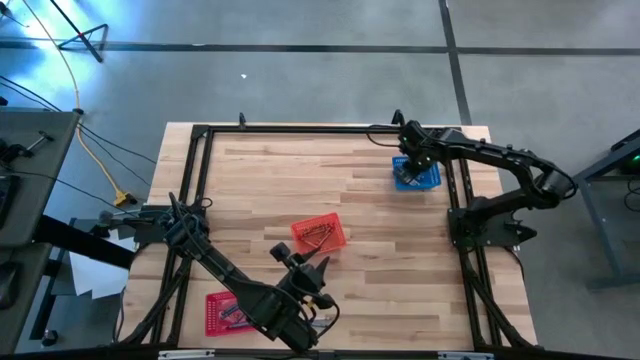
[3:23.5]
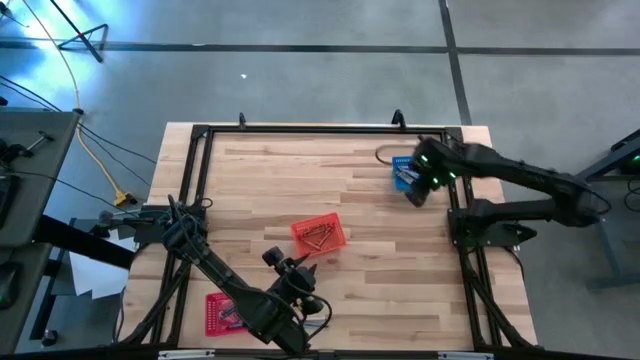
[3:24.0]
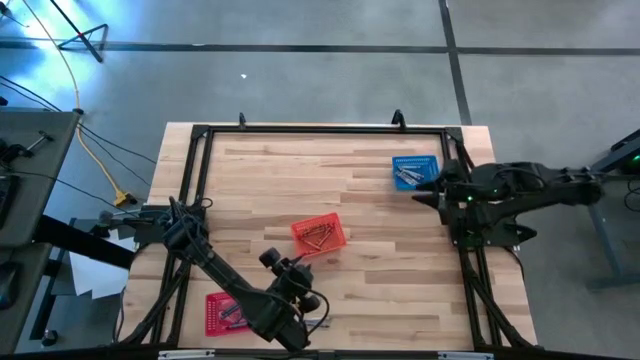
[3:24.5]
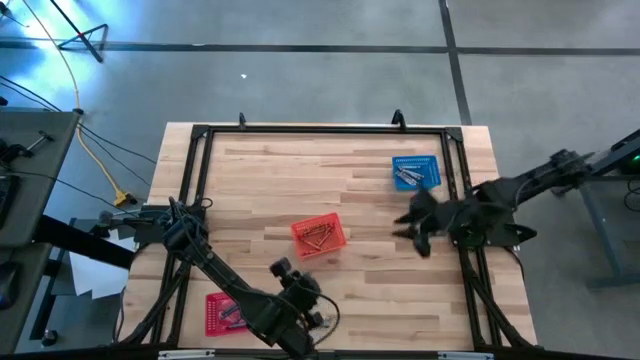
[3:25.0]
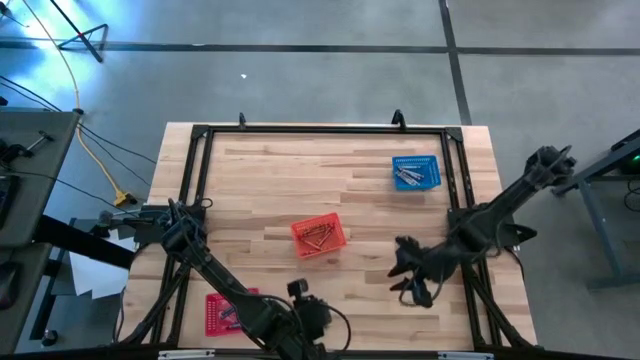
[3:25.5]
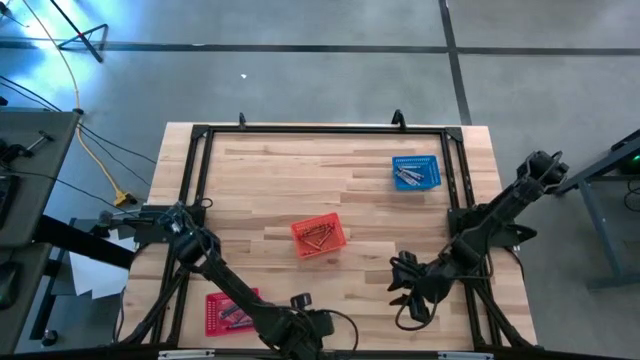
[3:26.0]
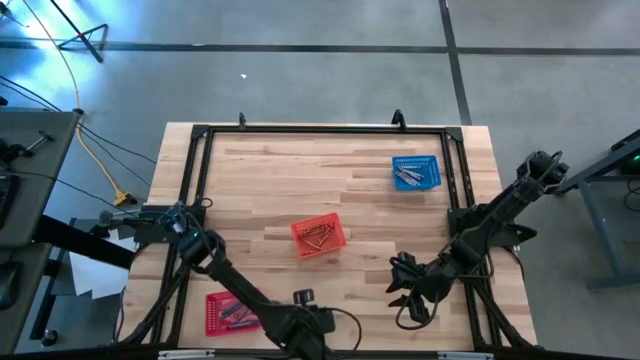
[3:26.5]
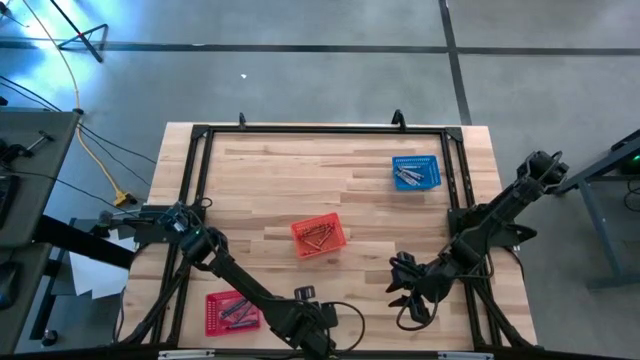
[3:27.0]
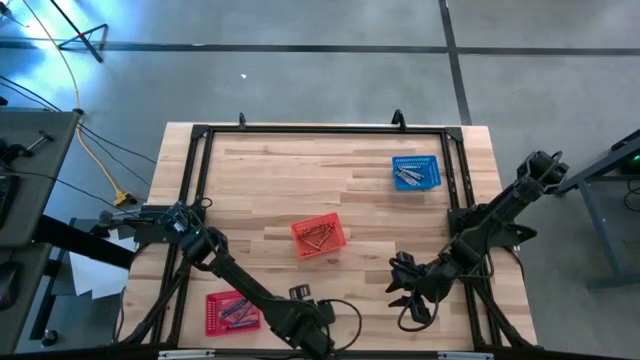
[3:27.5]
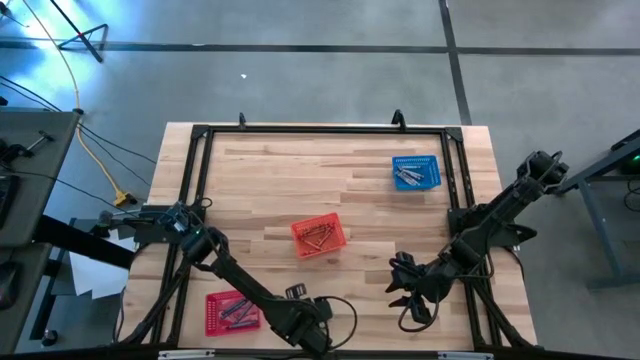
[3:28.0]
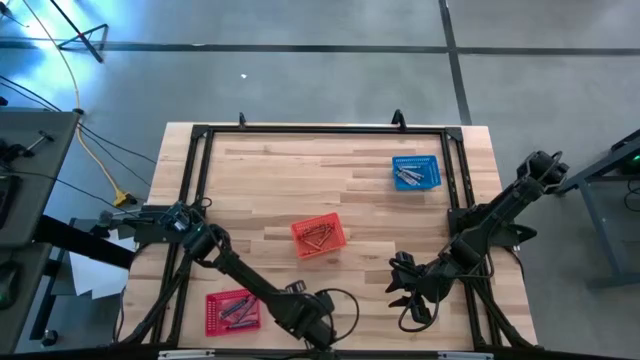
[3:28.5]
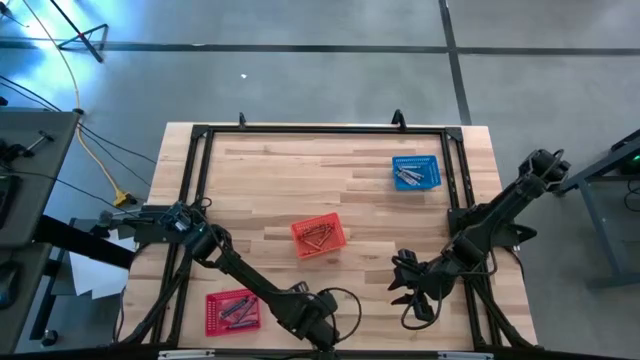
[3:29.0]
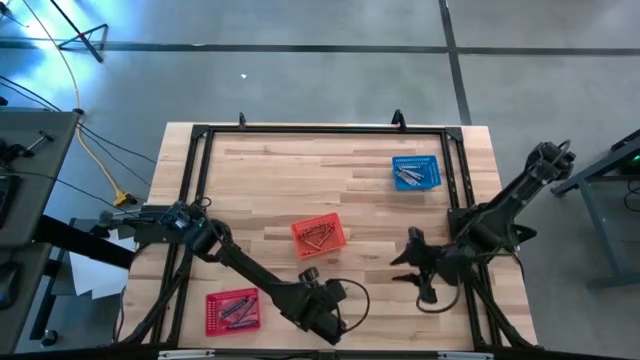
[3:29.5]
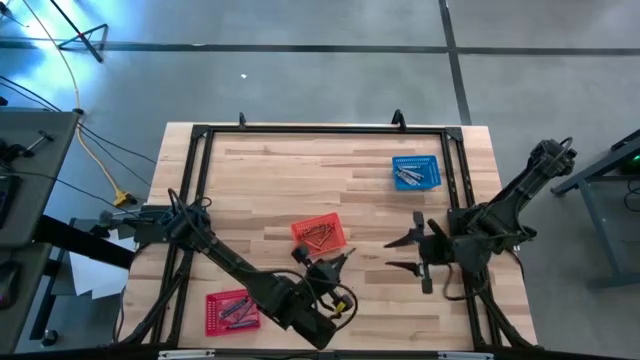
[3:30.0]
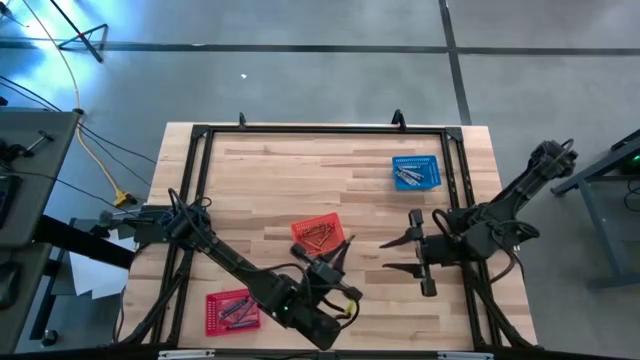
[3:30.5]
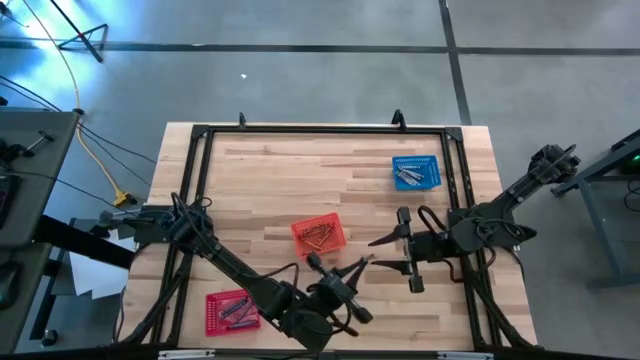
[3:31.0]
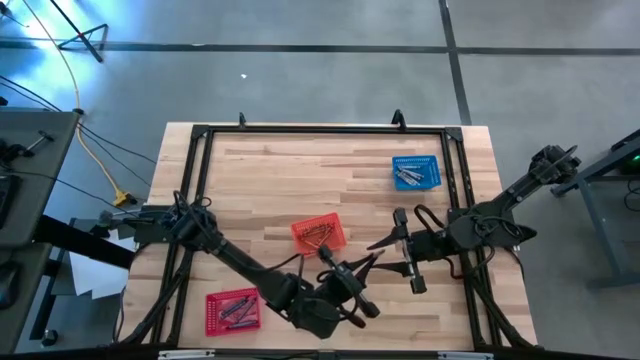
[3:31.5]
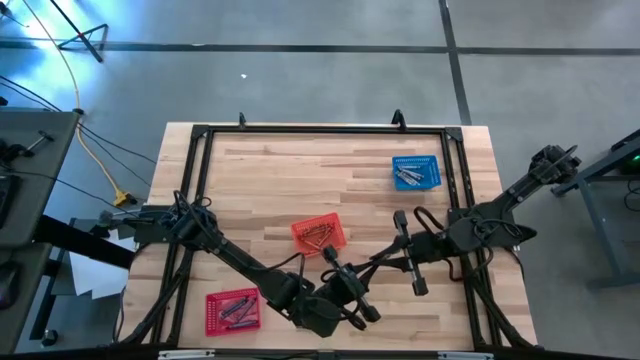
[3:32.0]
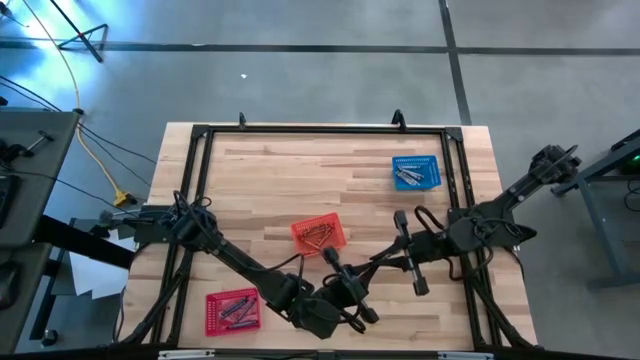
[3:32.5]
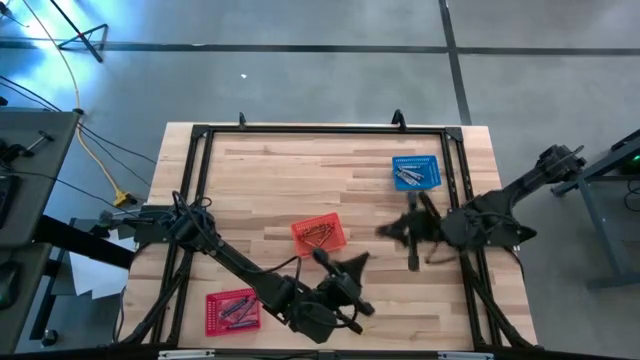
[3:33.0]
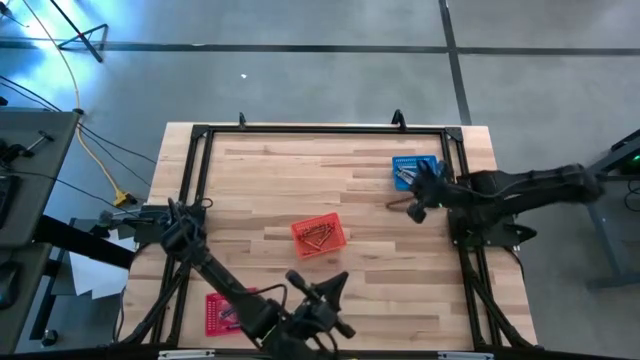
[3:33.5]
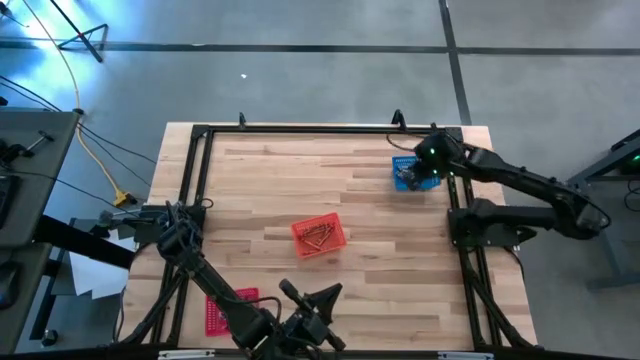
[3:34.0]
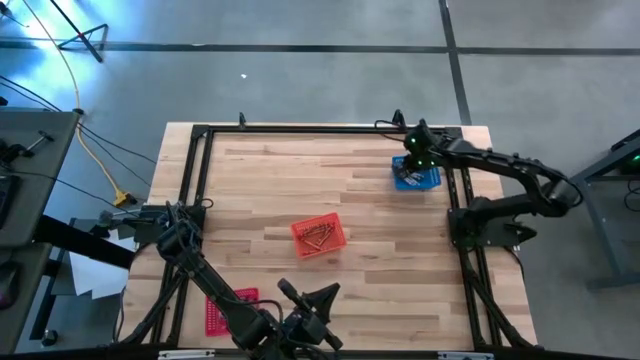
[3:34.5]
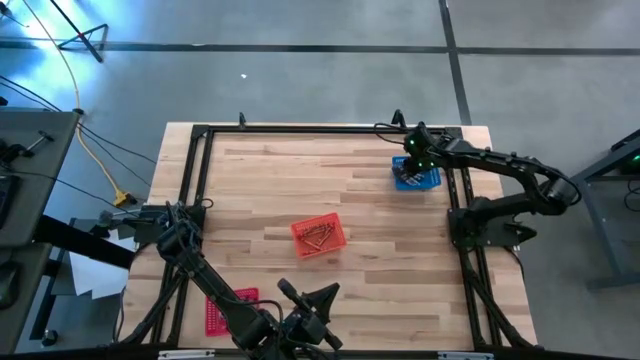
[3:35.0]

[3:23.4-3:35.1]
Task: Sort crayons
Put the gray crayon into the blue bin

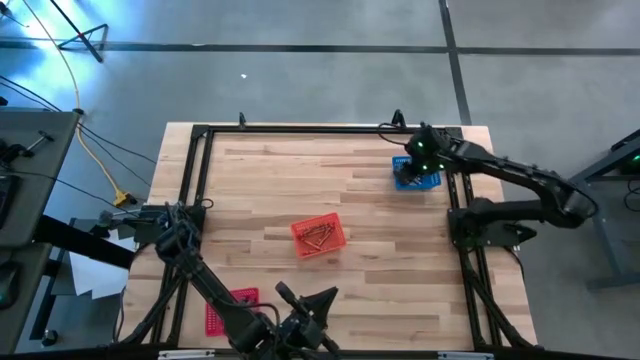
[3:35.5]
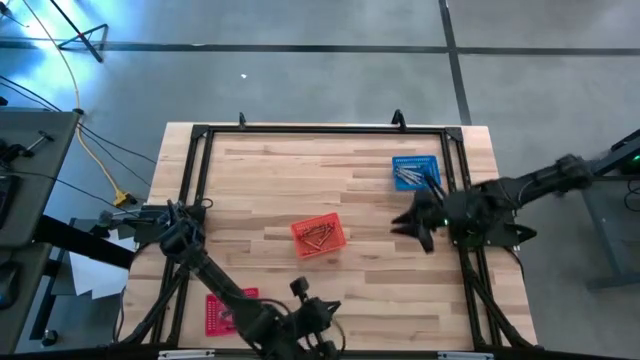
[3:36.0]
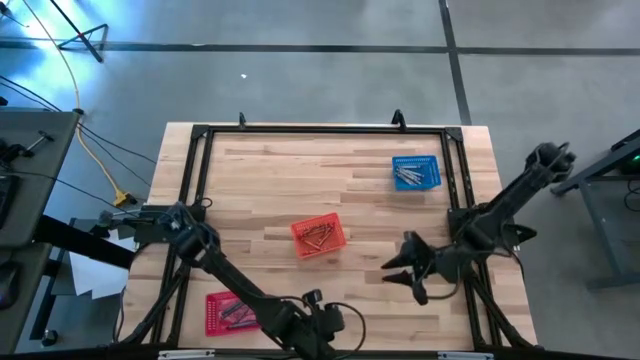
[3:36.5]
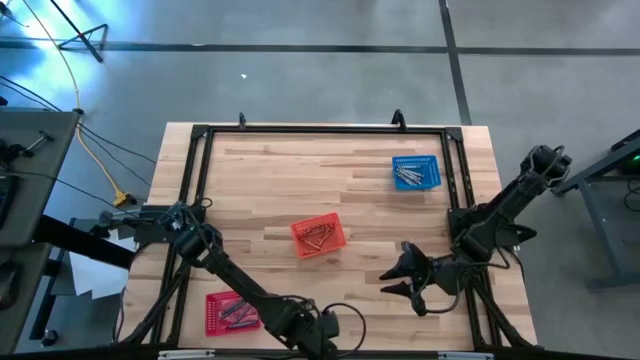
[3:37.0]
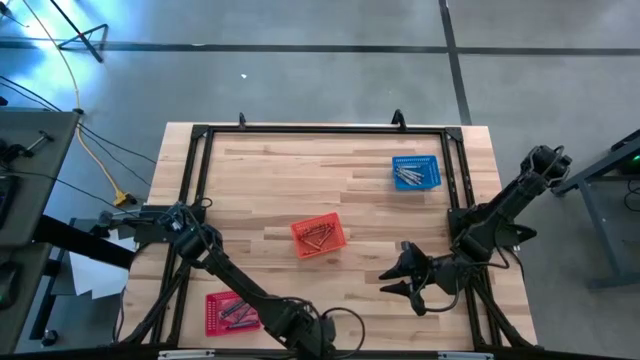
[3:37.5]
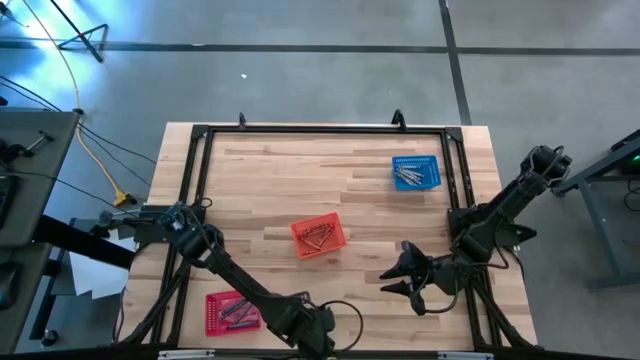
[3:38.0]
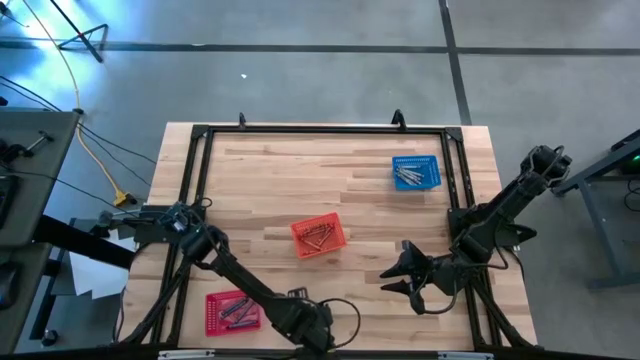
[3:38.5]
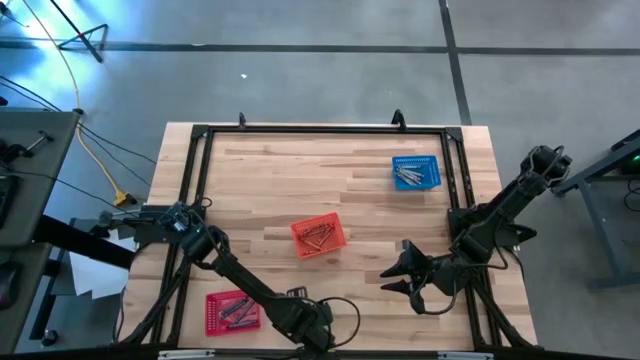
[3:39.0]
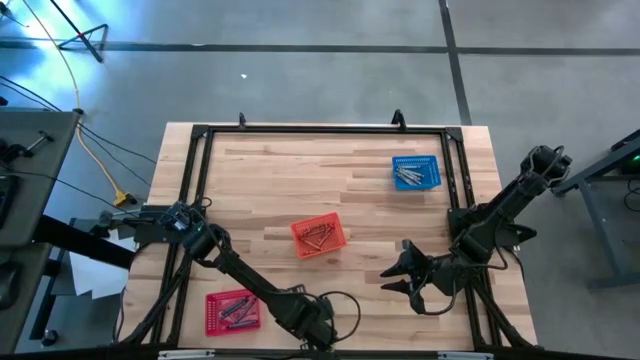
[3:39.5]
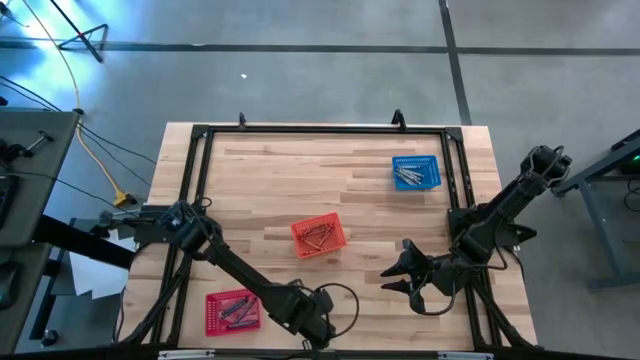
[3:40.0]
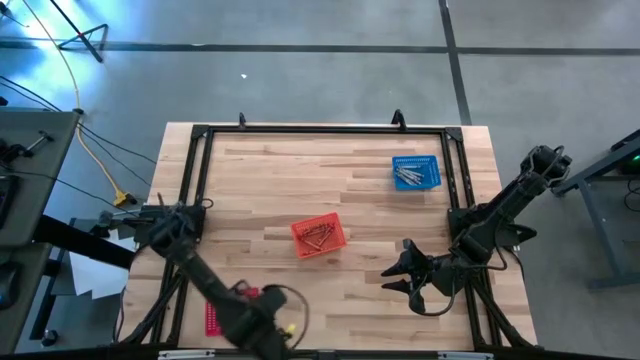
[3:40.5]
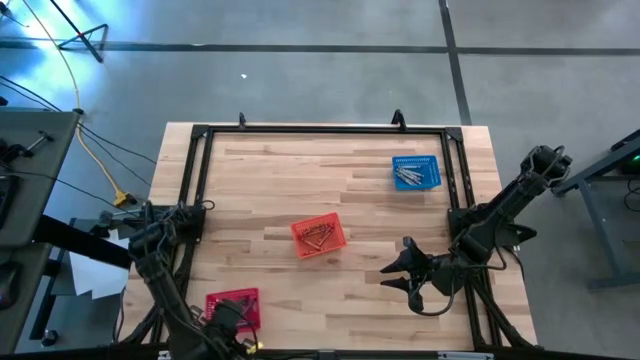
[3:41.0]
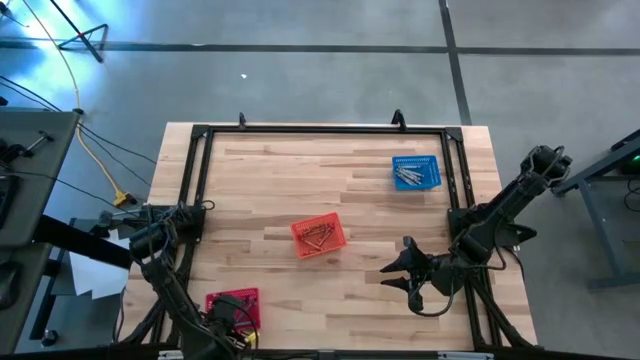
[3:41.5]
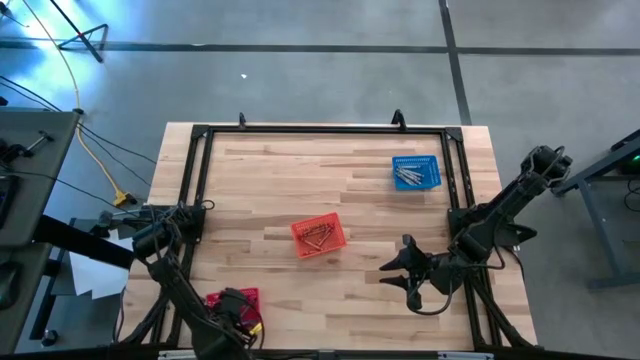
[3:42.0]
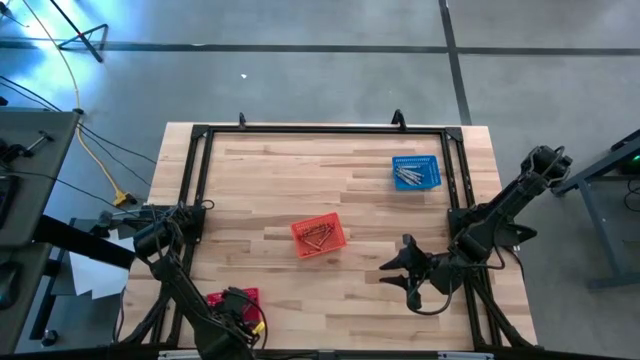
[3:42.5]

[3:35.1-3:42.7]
Put the blue crayon into the red bin

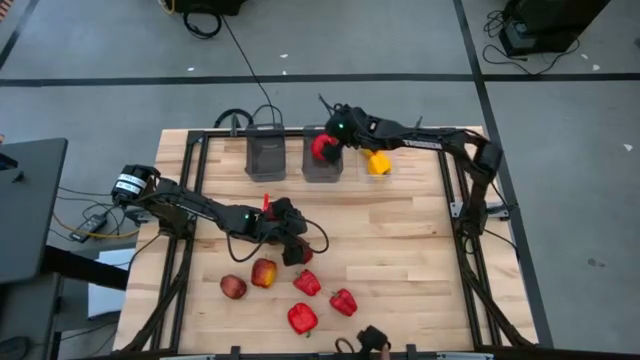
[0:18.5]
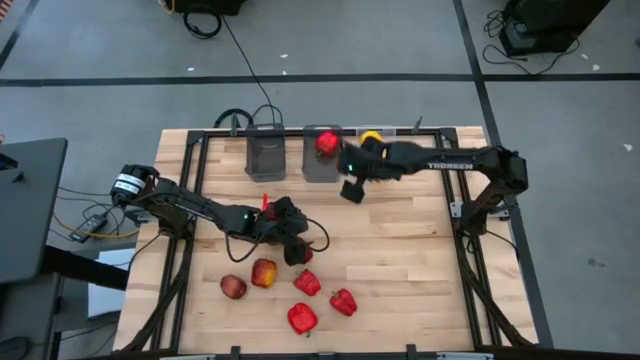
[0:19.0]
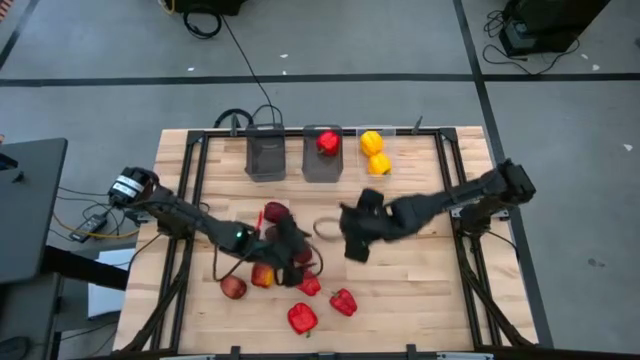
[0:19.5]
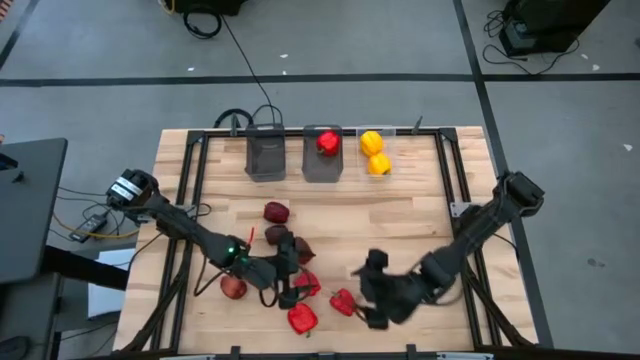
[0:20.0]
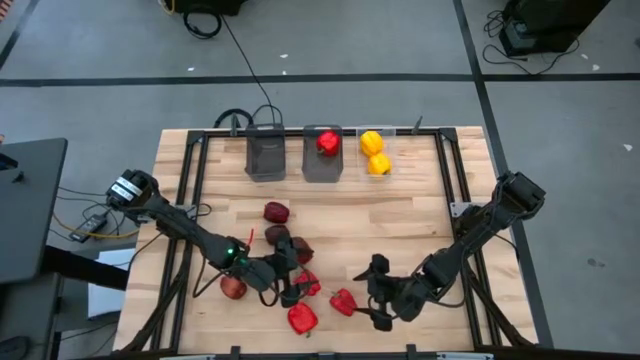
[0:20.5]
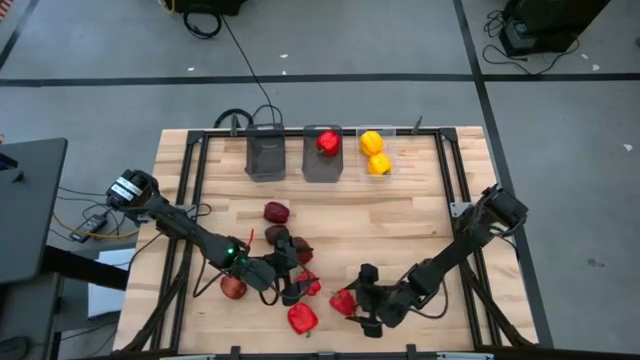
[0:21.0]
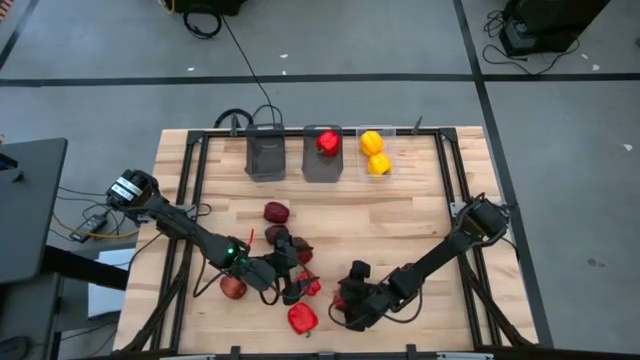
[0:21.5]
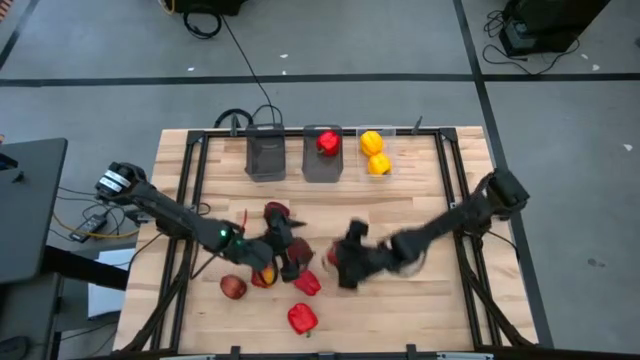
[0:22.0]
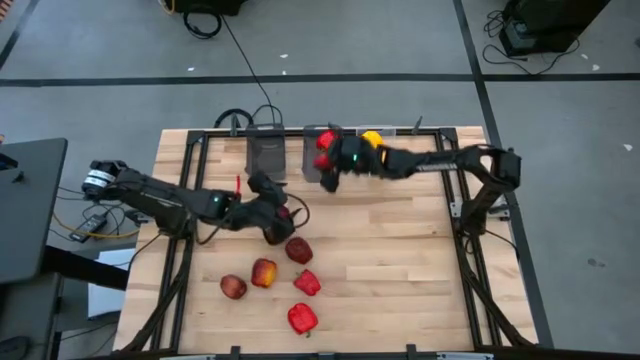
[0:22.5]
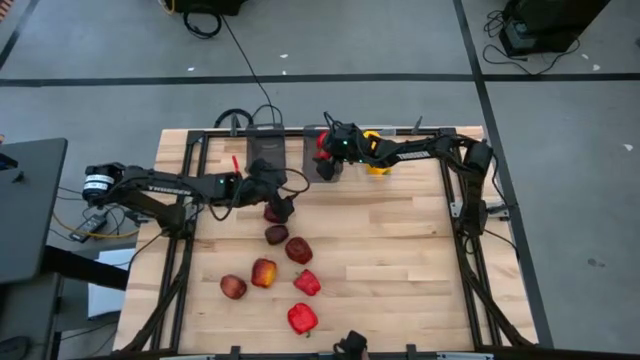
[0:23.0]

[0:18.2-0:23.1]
Task: Sort produce into baskets
Put the red bell pepper into the right black bin
